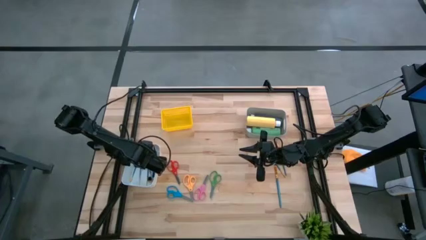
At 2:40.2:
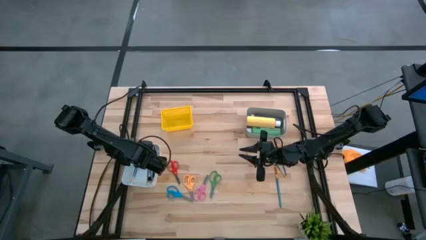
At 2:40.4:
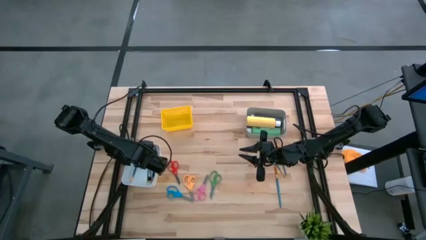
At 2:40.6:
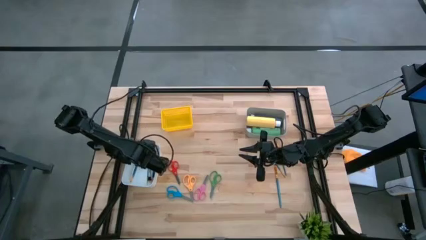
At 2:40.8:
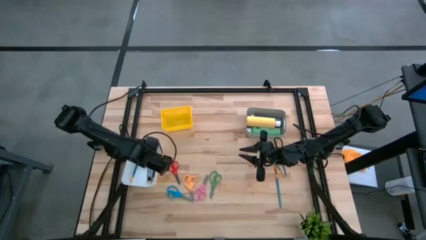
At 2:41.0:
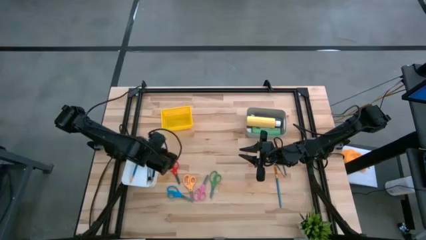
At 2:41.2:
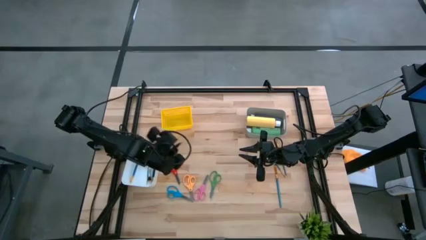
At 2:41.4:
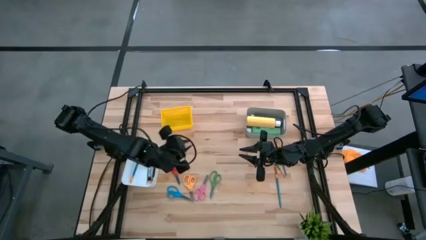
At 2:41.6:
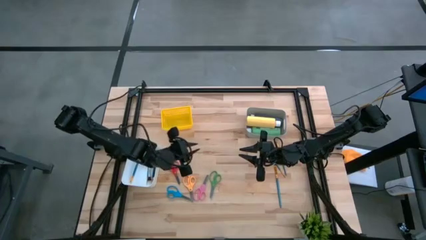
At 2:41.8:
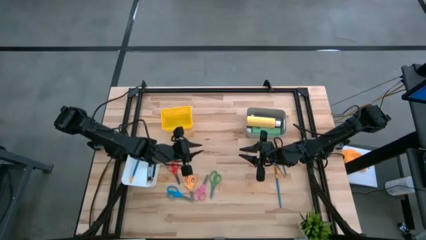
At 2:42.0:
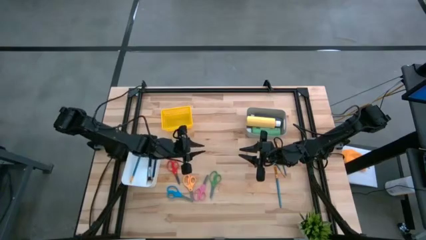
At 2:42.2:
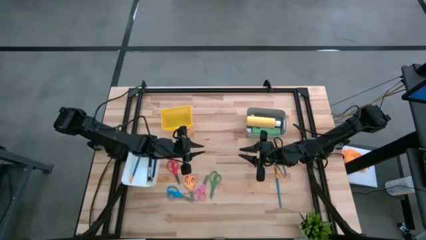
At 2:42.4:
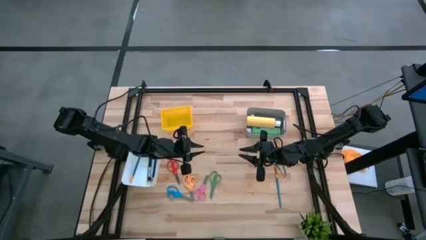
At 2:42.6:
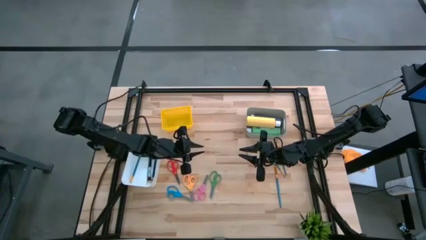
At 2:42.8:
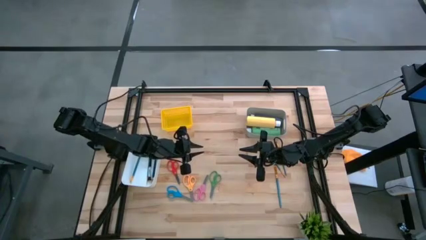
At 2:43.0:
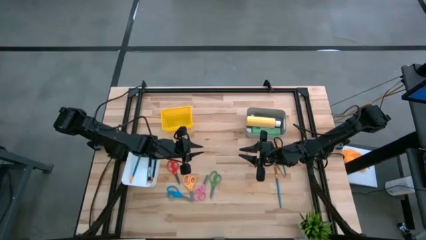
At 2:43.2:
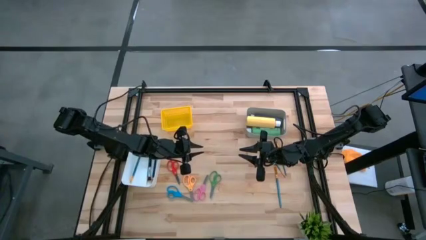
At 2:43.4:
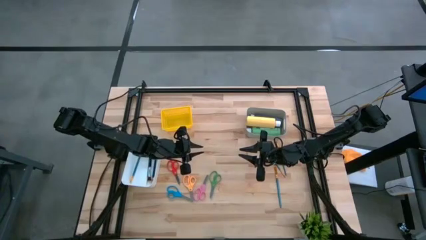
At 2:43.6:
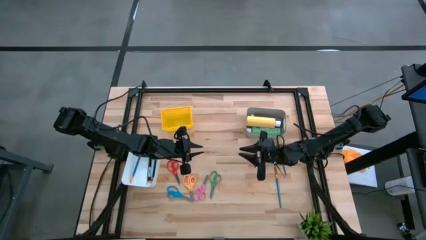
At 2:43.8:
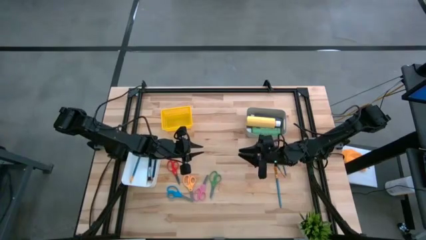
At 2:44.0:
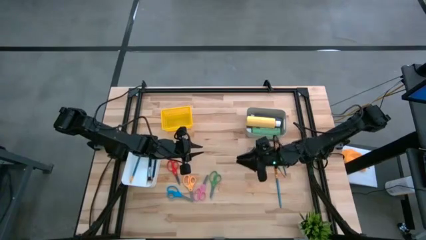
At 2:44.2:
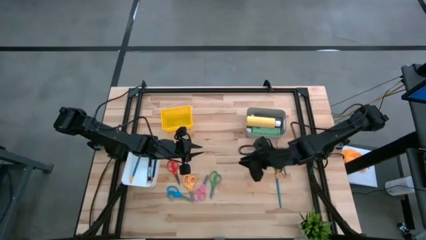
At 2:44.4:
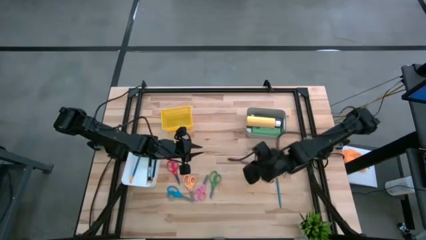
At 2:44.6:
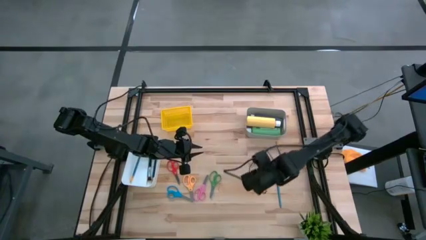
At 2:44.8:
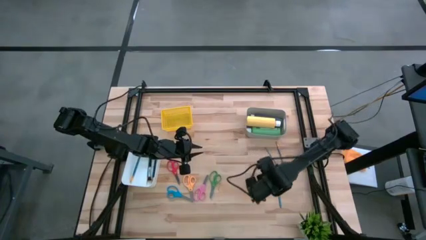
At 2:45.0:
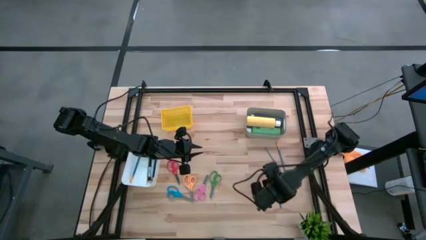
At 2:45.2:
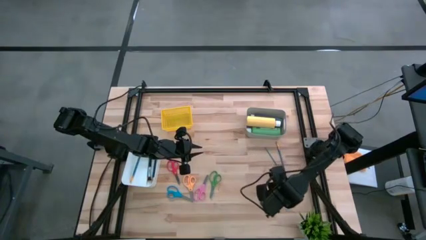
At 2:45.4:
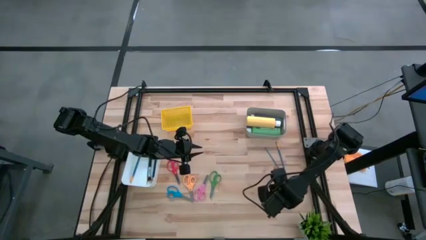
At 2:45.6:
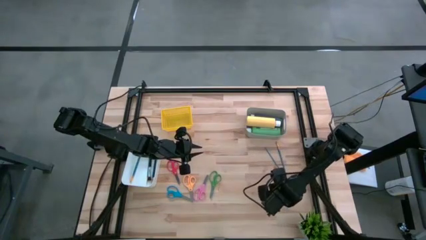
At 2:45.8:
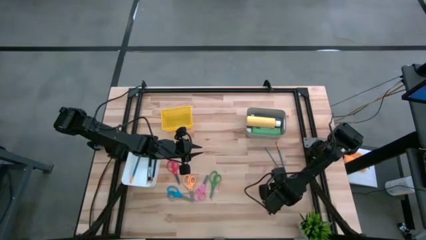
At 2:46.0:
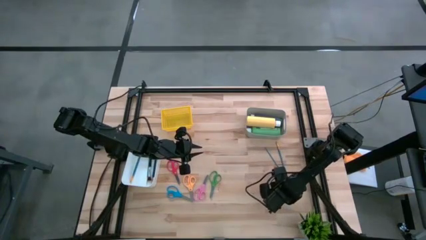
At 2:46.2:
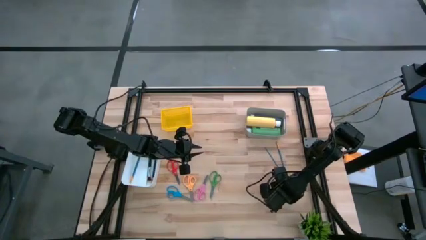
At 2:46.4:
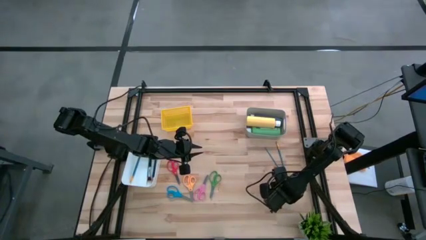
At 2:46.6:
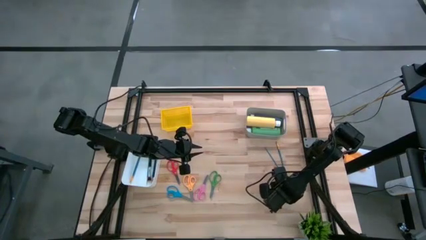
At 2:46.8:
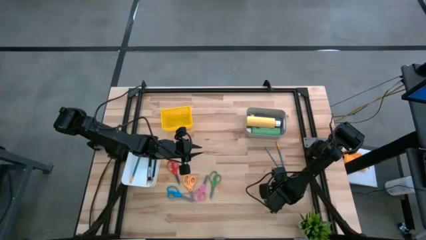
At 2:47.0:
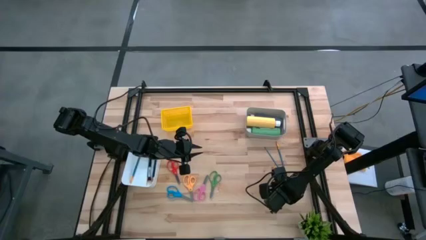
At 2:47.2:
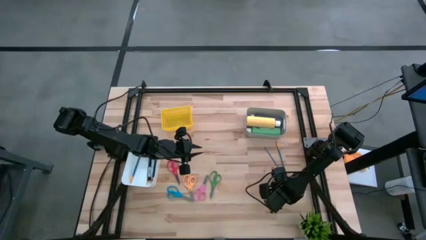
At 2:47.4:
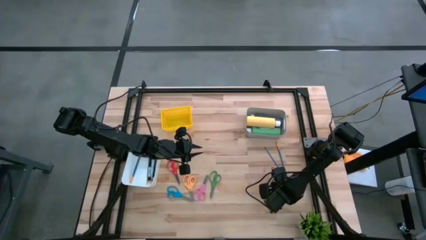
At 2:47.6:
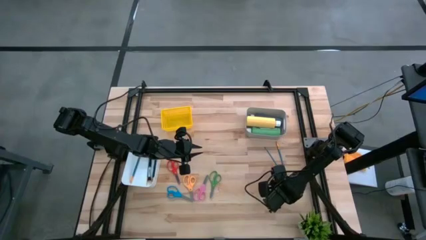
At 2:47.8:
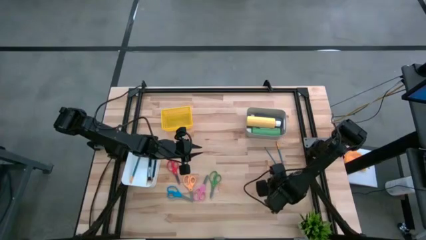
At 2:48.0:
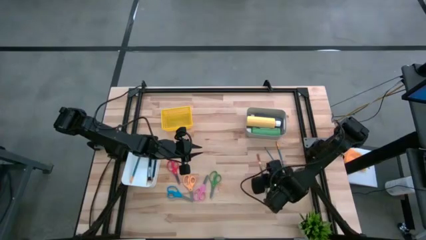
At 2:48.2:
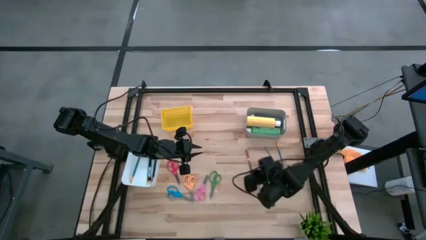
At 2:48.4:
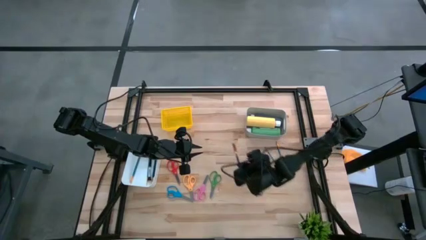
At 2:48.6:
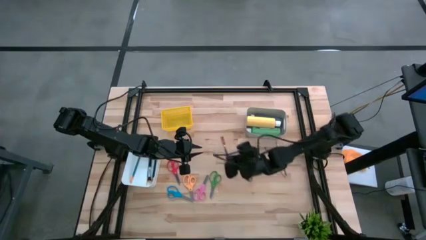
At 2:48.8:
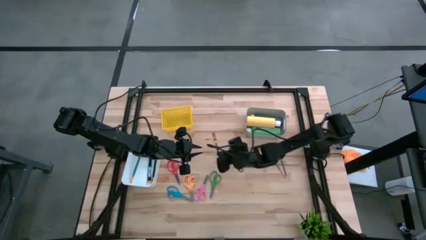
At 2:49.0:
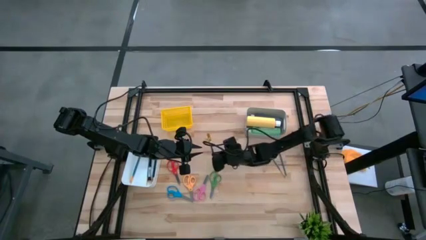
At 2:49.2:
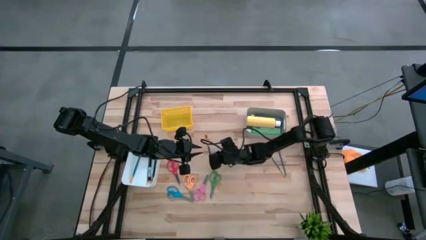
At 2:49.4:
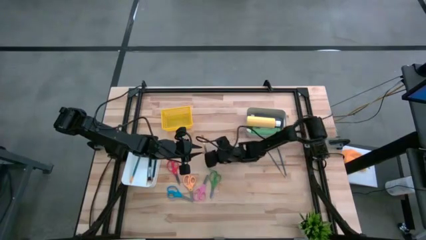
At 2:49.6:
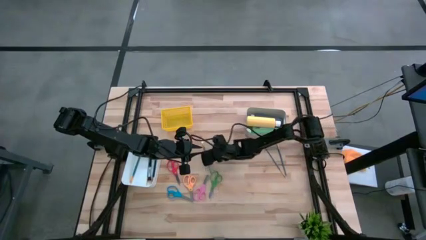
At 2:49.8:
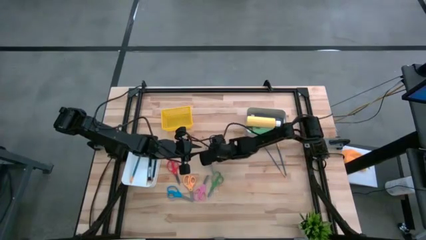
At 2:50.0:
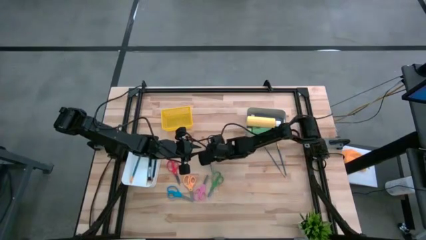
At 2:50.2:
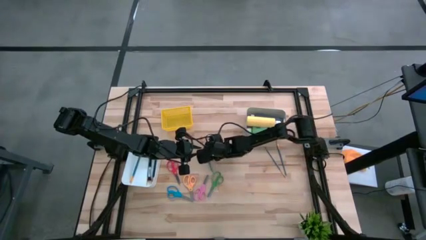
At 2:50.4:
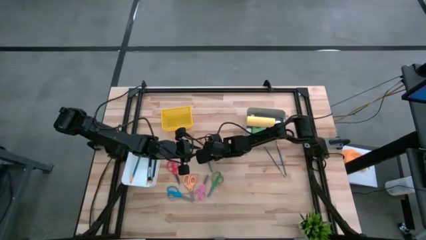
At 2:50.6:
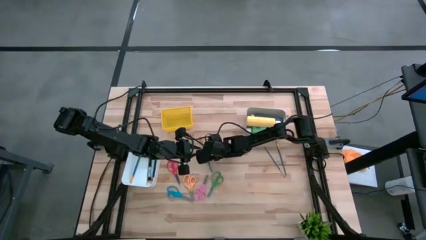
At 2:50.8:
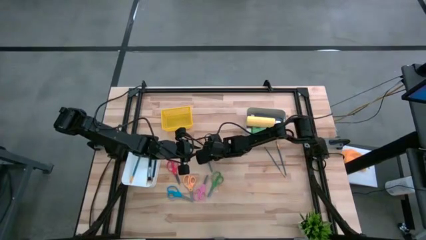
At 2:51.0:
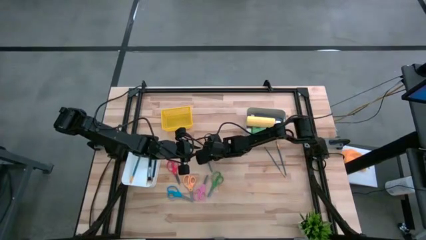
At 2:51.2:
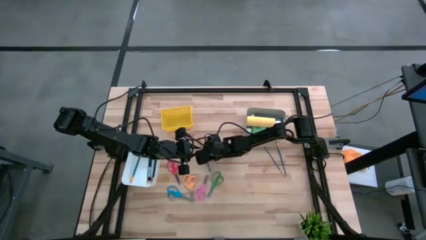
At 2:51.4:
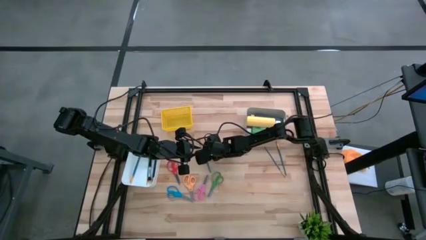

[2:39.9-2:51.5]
Task: Pick & Place Paint Supplies
Put the blue paintbrush into the white bin

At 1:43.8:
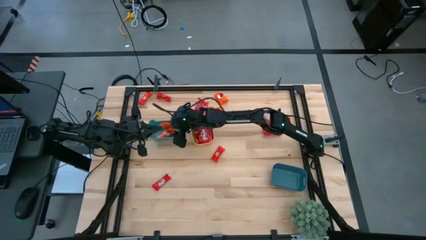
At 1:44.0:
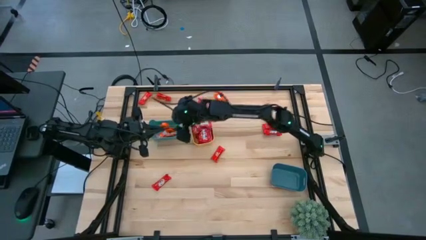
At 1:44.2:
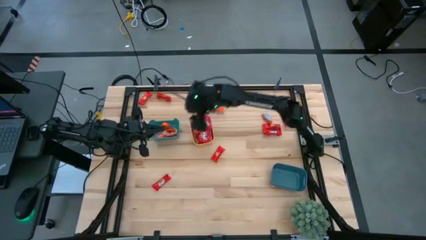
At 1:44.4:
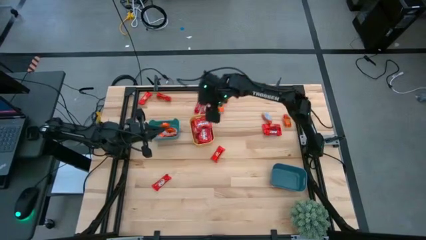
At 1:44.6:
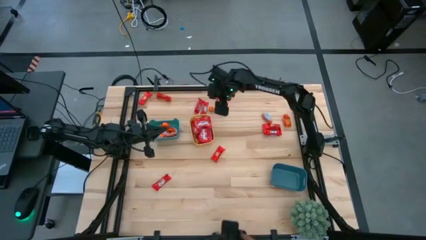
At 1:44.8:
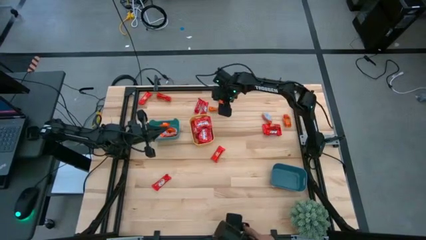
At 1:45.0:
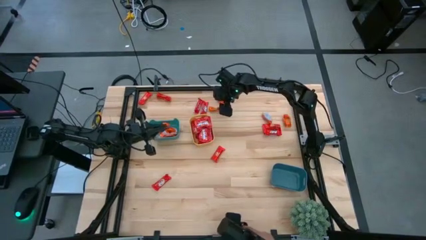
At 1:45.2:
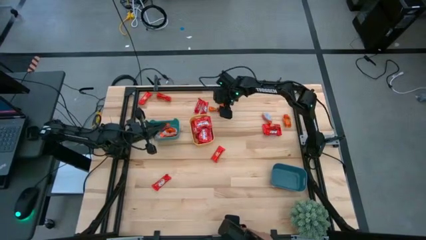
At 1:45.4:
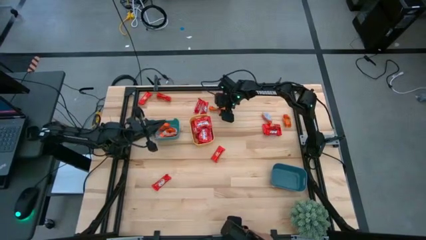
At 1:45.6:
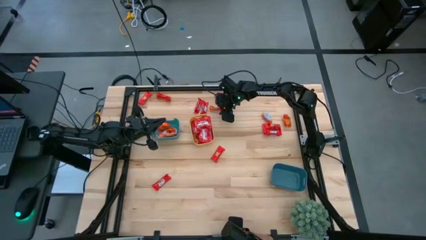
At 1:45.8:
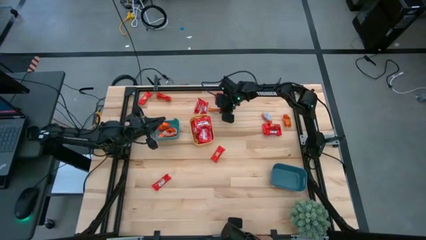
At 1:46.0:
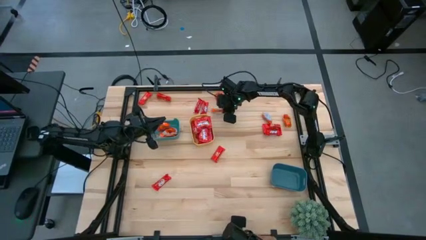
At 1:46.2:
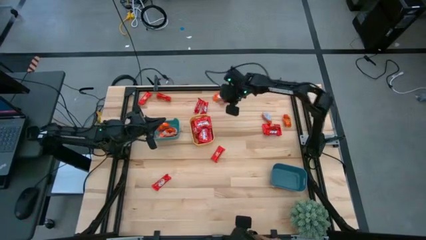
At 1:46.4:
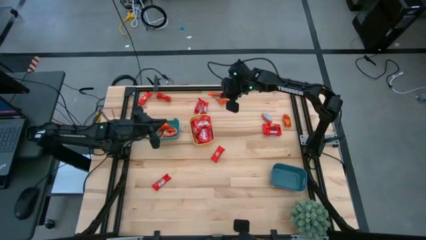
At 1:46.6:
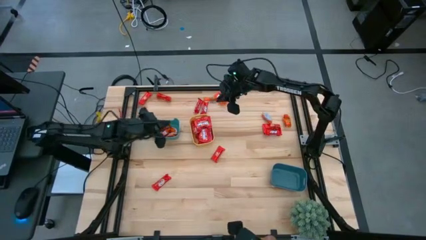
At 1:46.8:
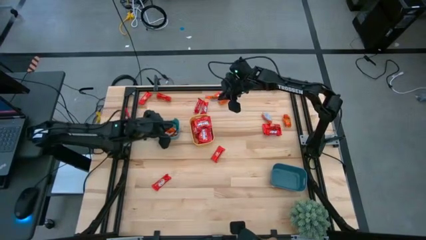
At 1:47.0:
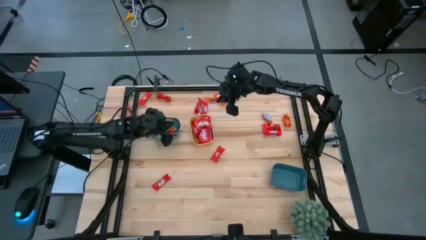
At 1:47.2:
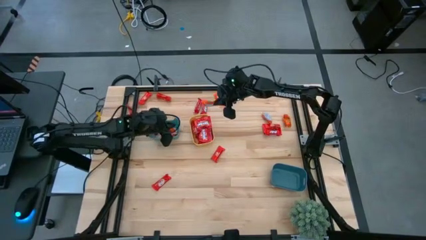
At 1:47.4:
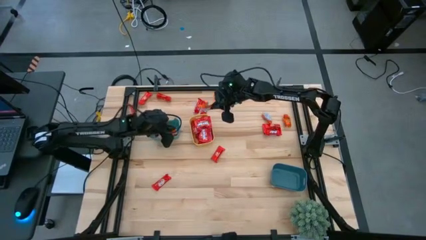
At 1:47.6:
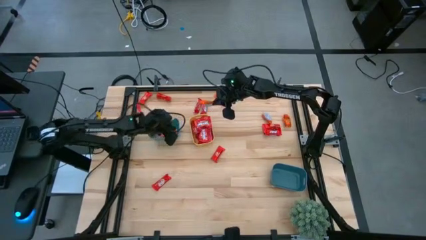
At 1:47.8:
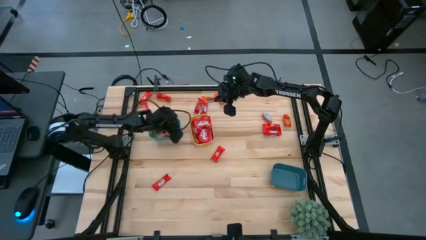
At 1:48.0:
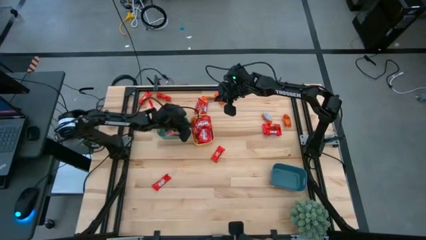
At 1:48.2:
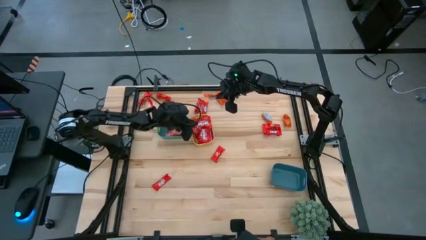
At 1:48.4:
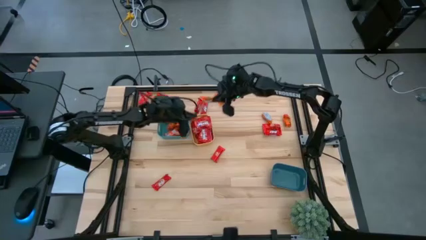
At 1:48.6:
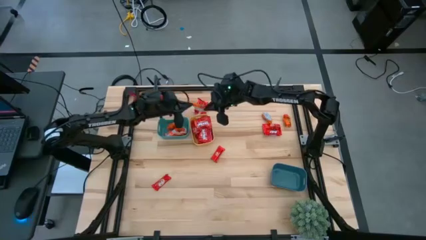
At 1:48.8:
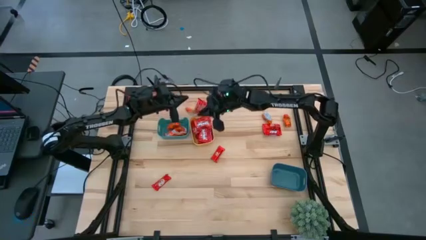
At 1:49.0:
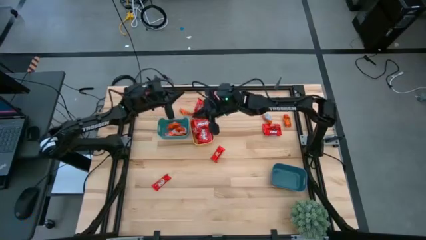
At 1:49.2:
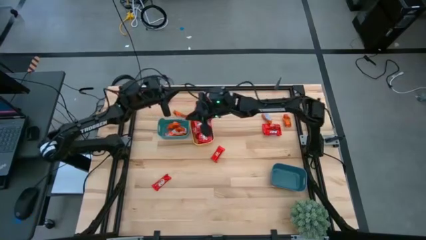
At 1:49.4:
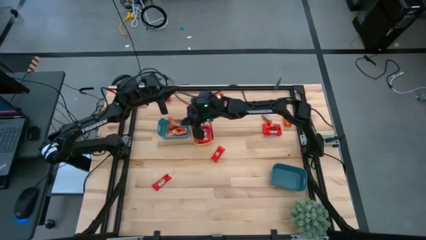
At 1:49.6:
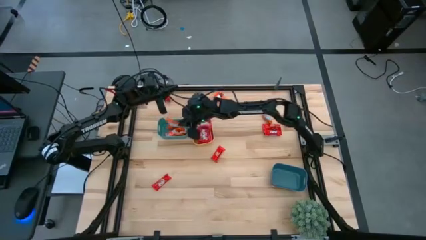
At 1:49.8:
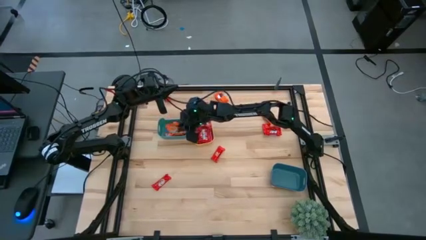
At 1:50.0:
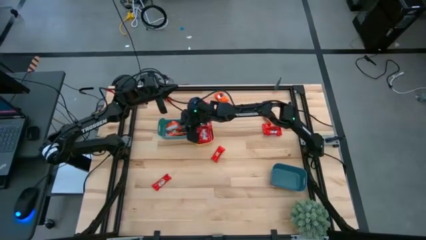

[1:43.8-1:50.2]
Task: Sort candy
Put the orange candy into the green bin
